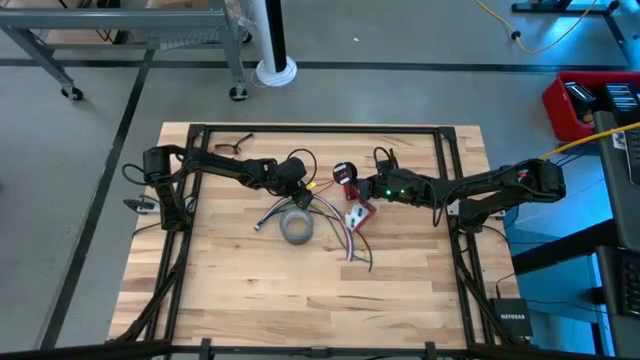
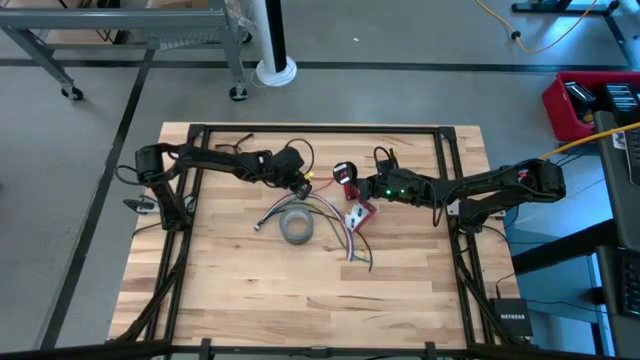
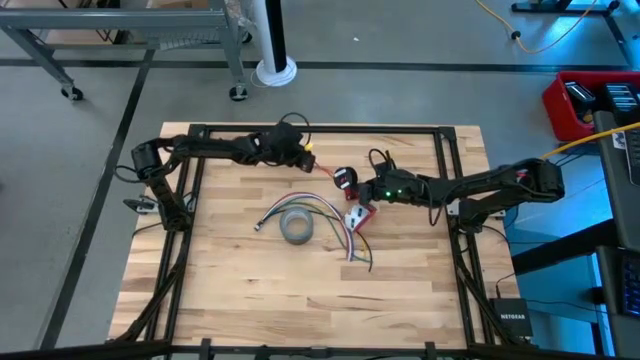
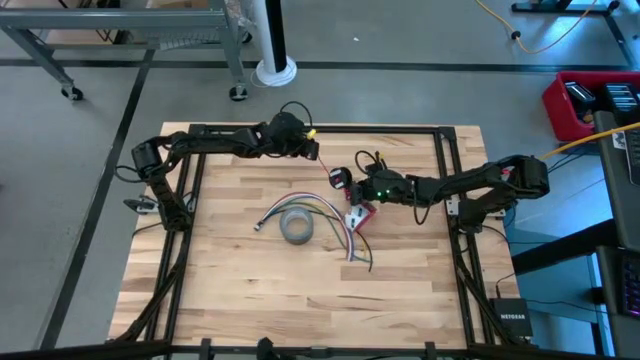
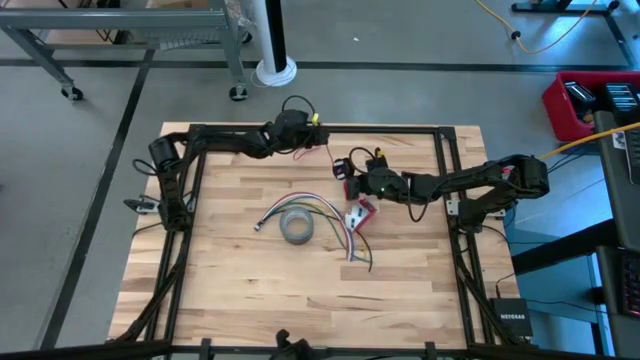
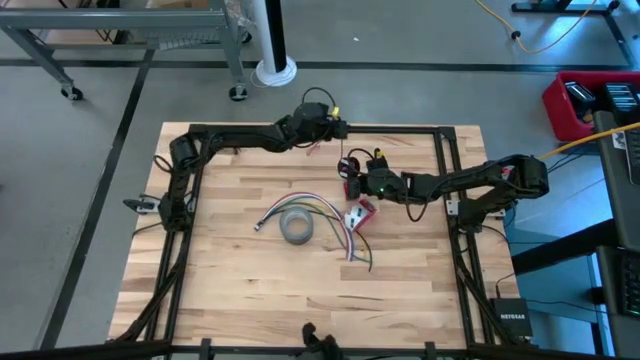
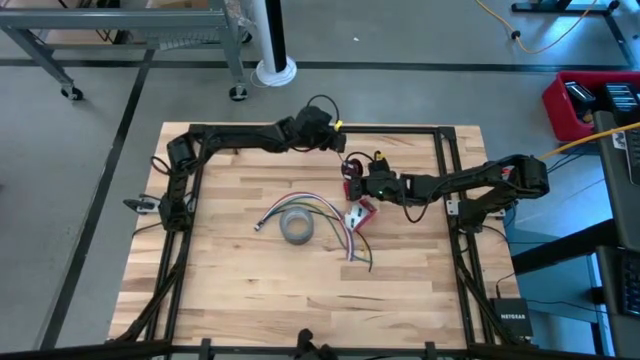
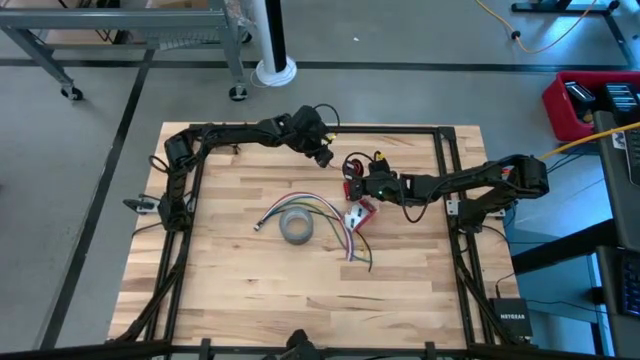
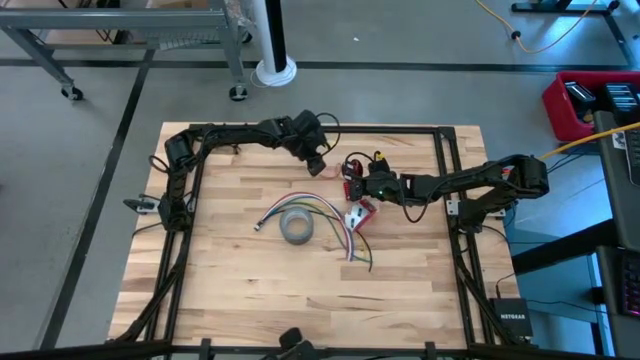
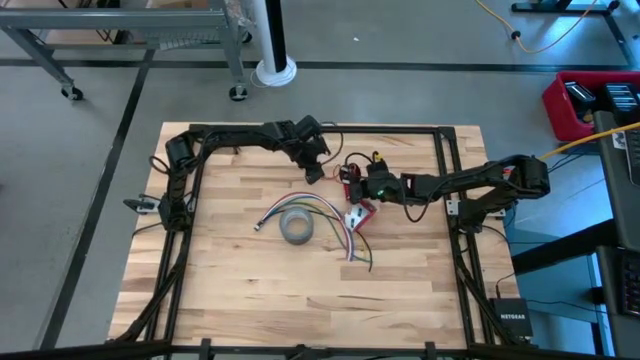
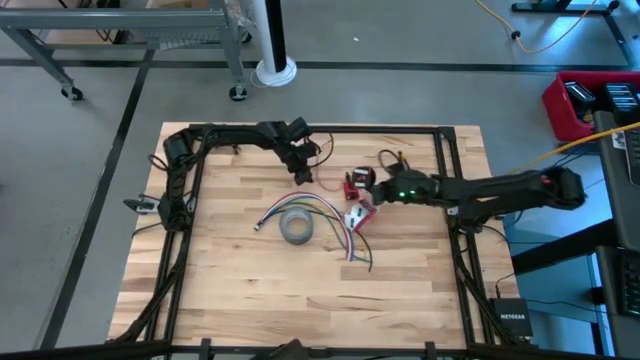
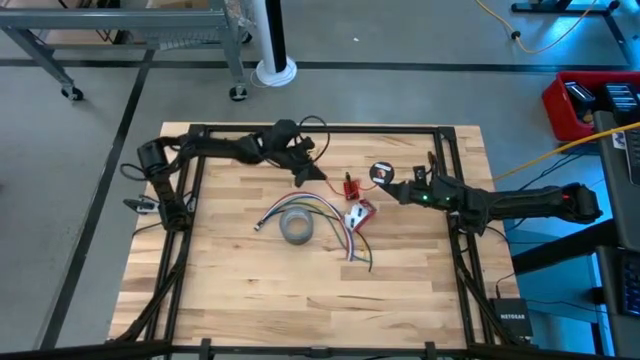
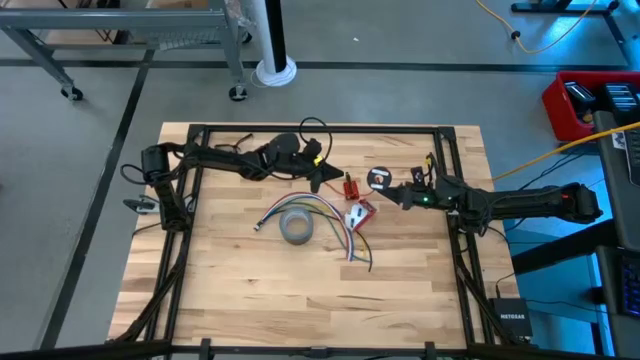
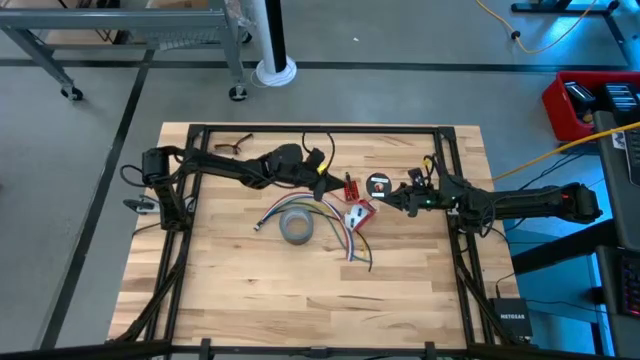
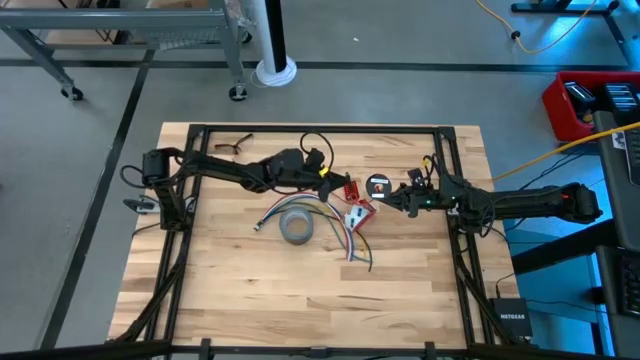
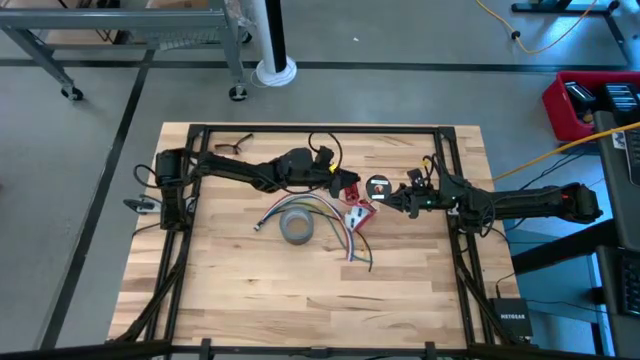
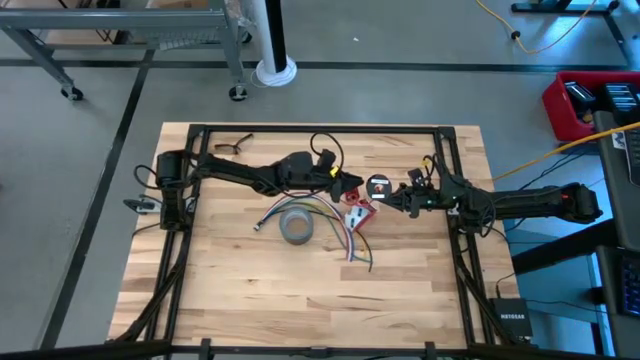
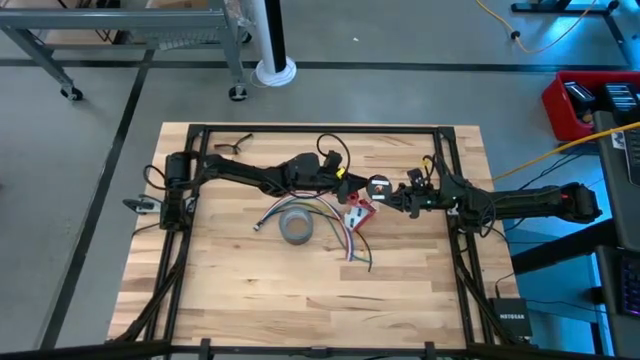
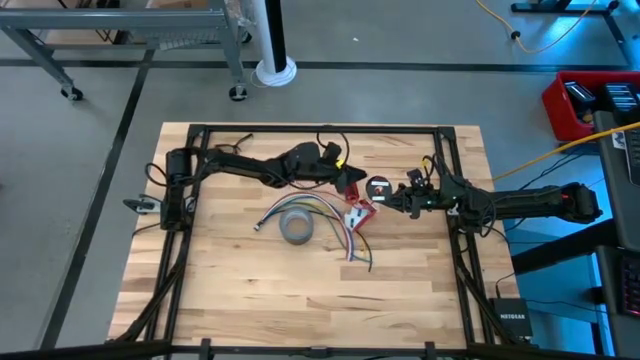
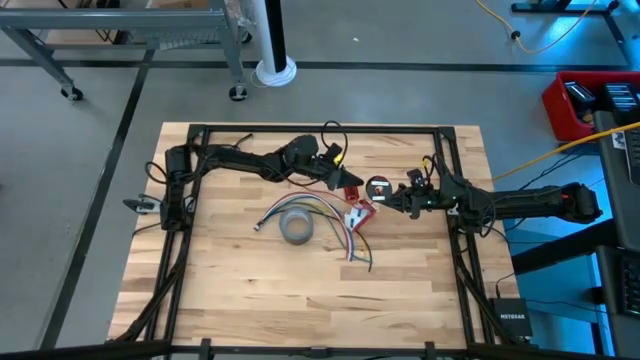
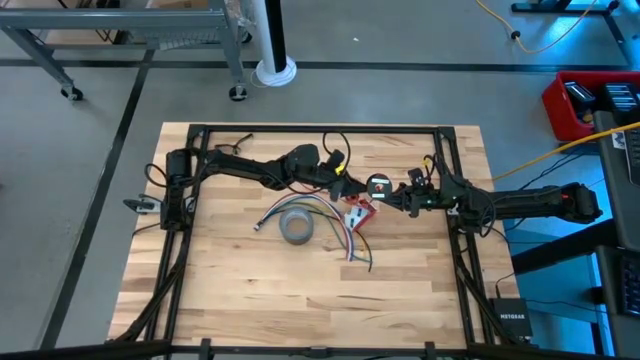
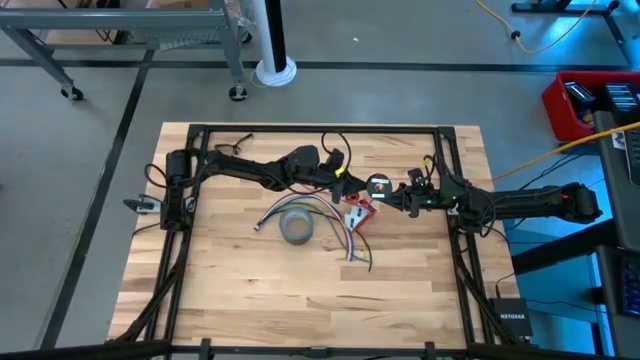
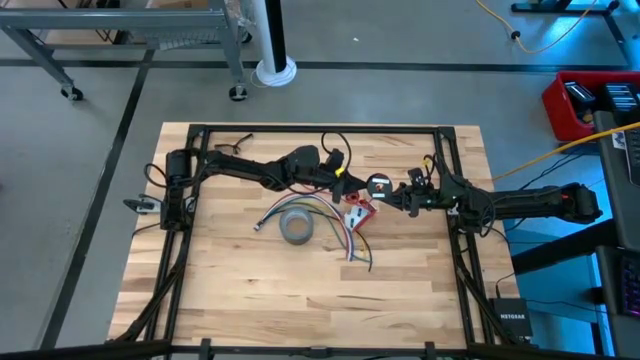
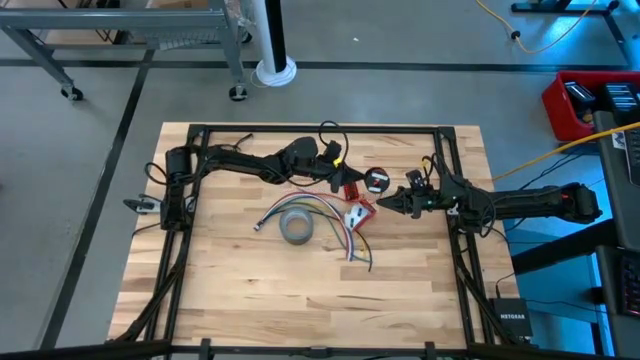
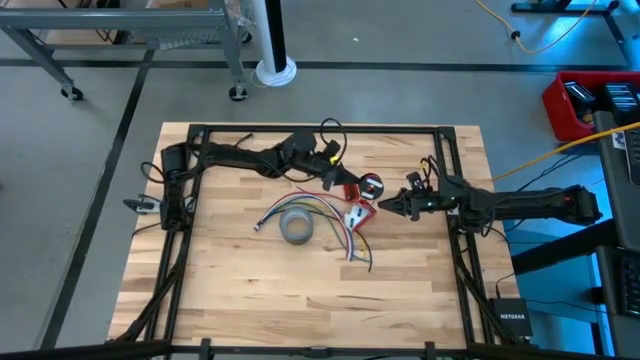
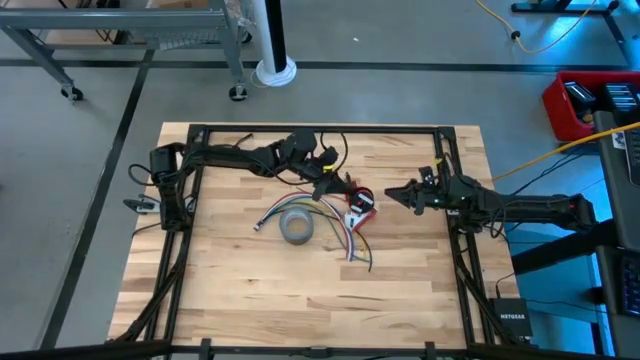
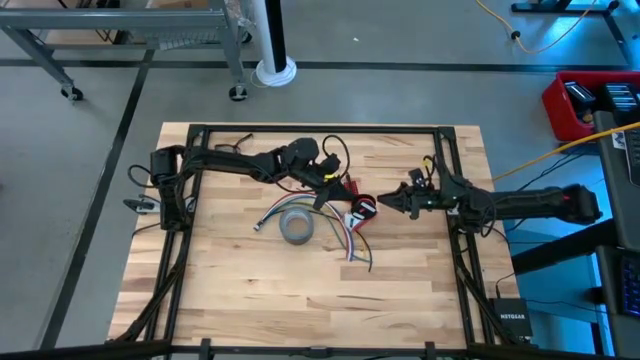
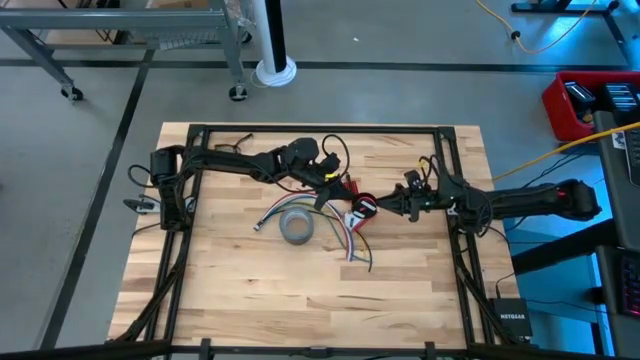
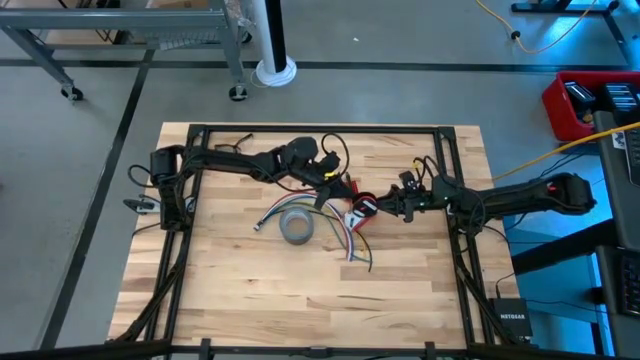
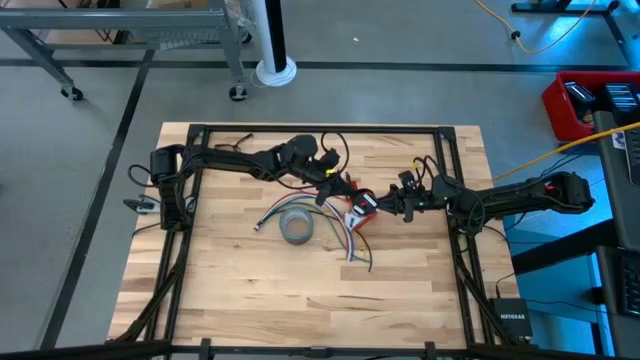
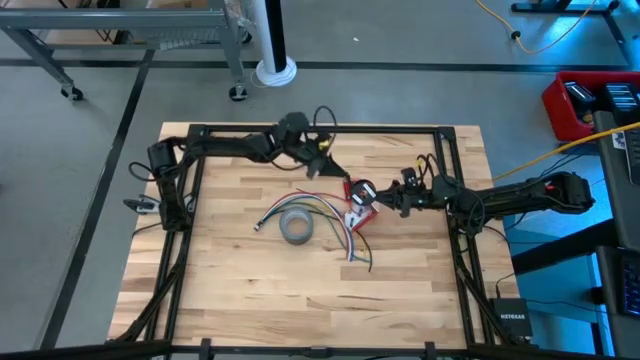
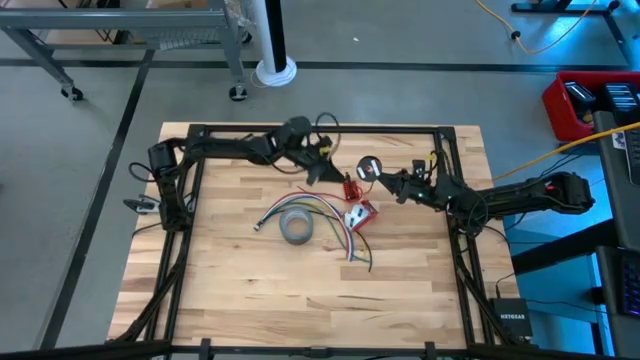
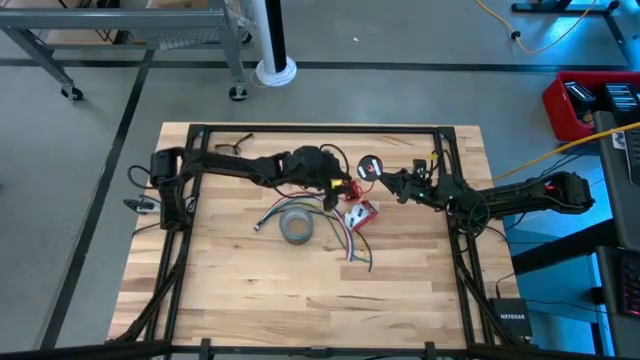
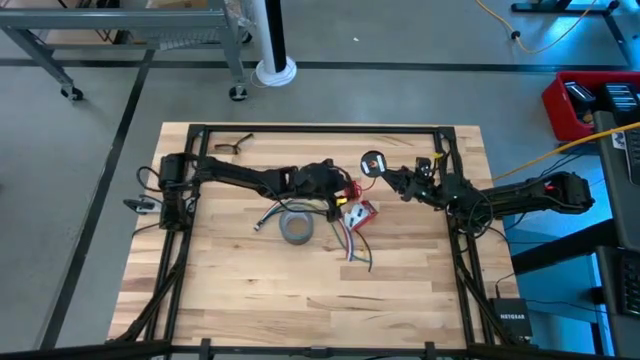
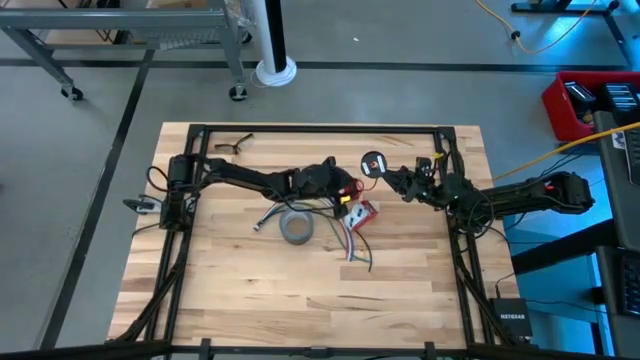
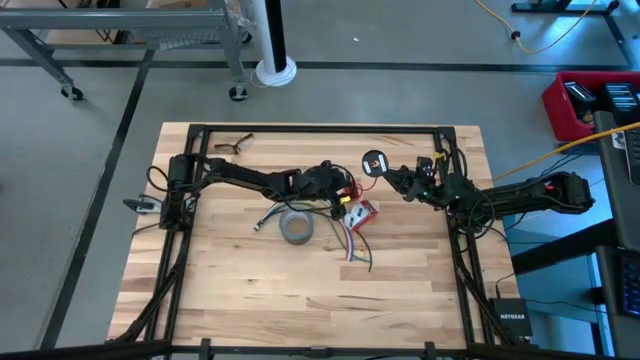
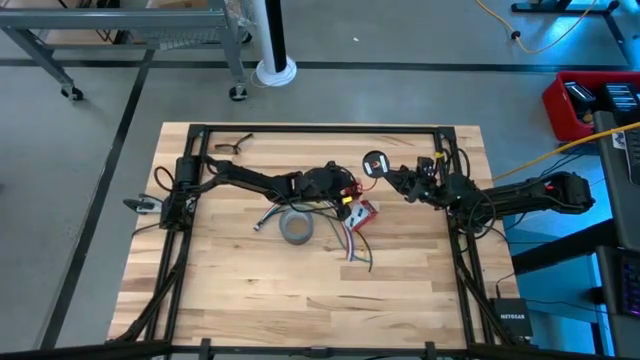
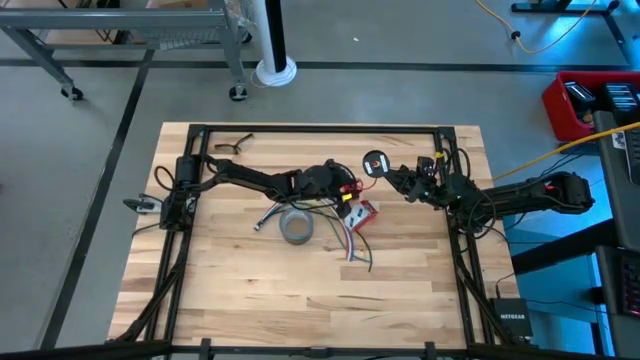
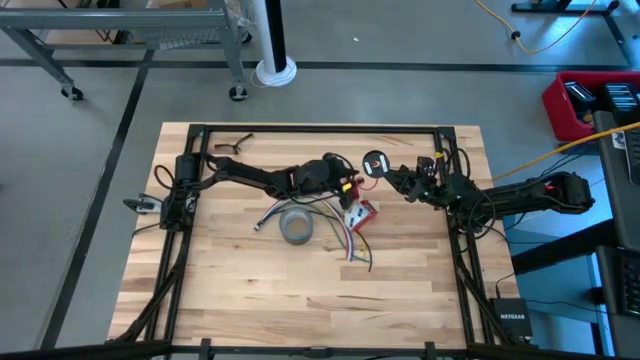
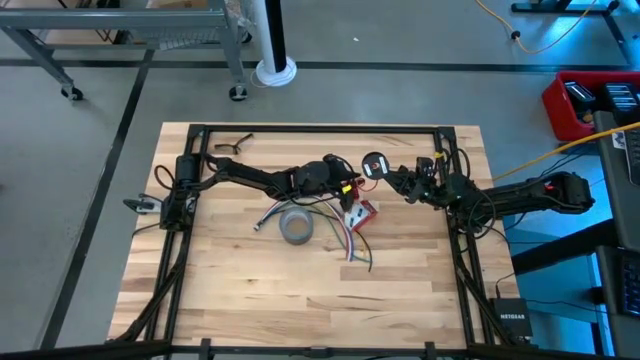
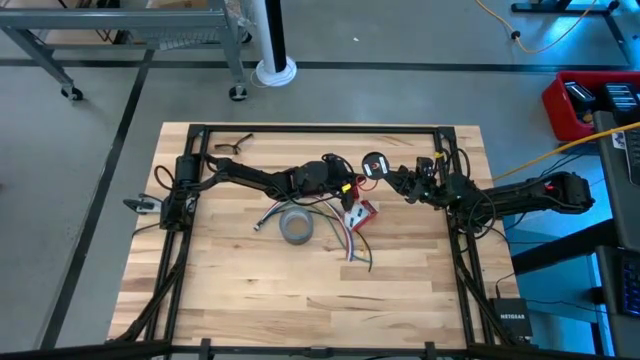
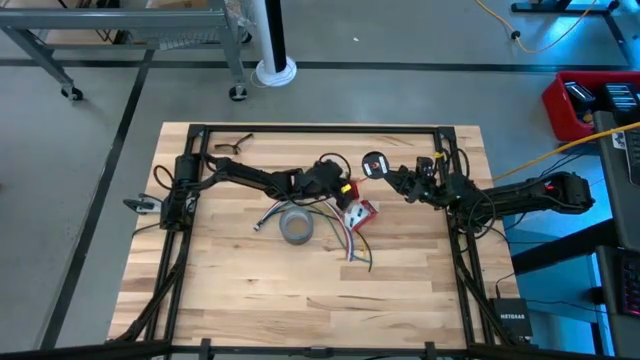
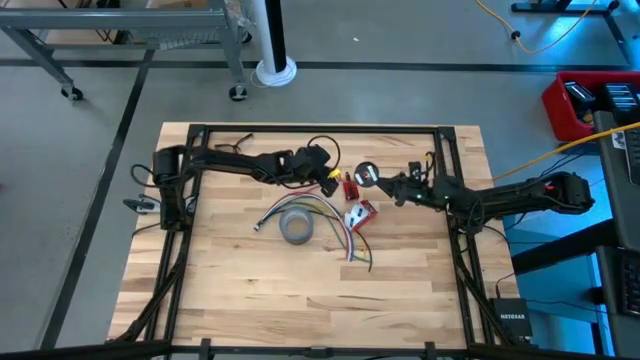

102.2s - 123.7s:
Task: Coil cords
Coil the red wire on the black spool
